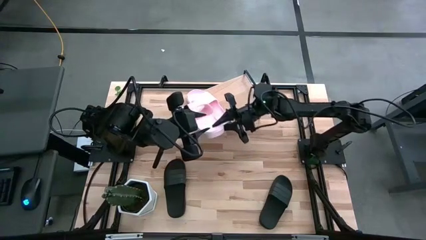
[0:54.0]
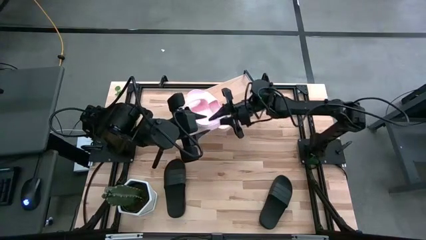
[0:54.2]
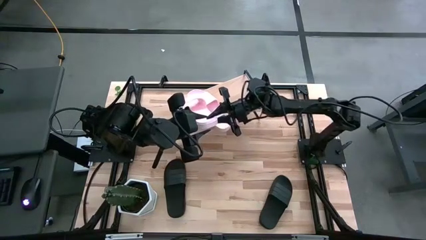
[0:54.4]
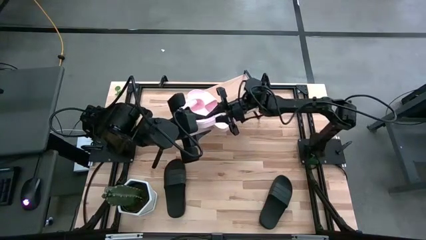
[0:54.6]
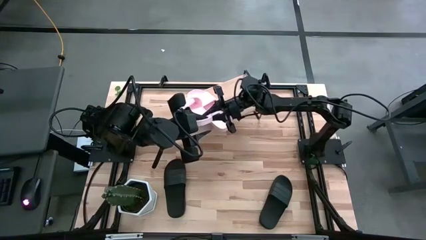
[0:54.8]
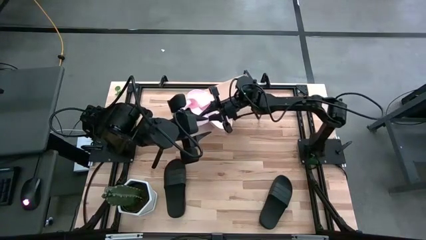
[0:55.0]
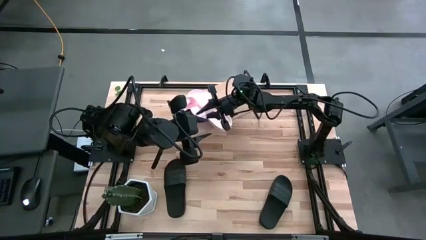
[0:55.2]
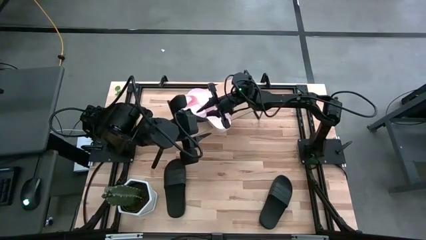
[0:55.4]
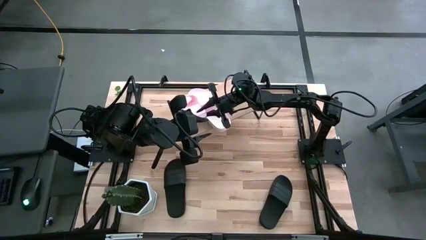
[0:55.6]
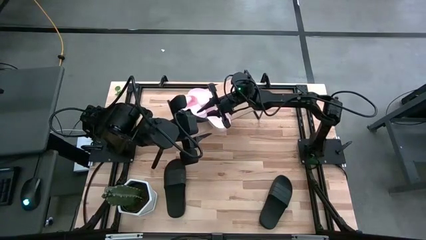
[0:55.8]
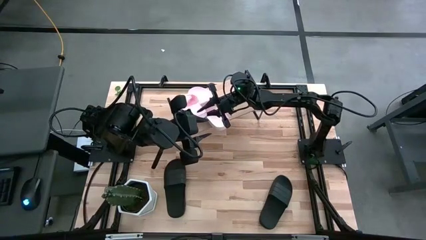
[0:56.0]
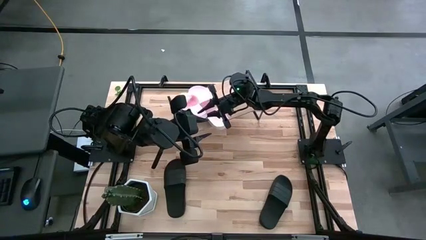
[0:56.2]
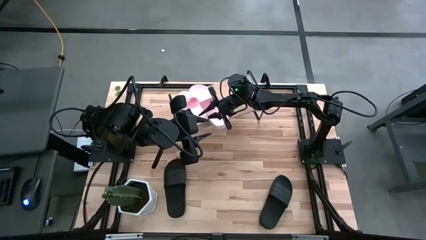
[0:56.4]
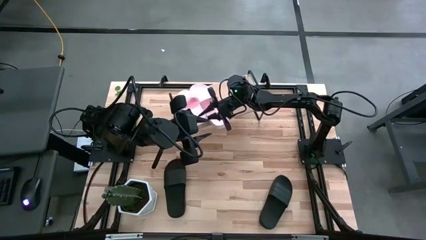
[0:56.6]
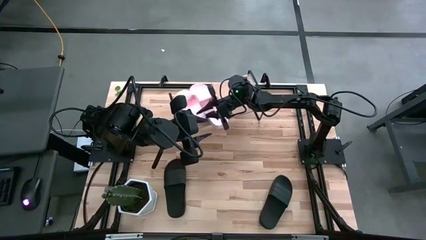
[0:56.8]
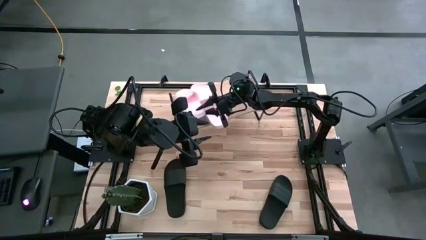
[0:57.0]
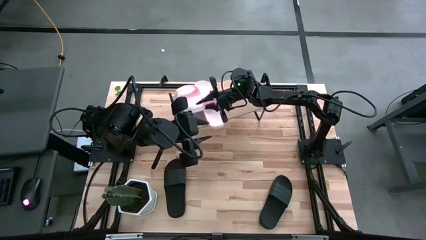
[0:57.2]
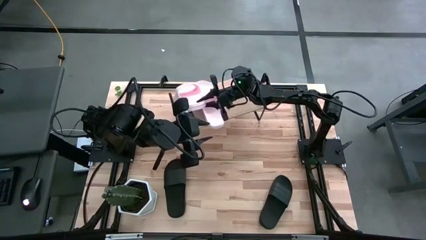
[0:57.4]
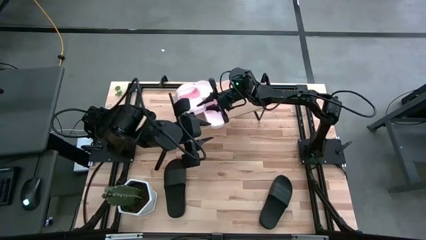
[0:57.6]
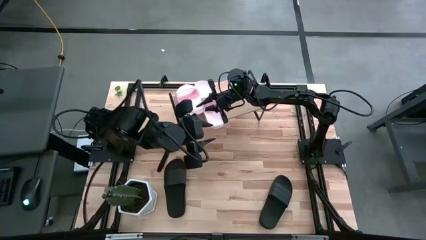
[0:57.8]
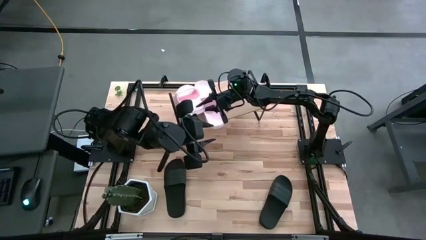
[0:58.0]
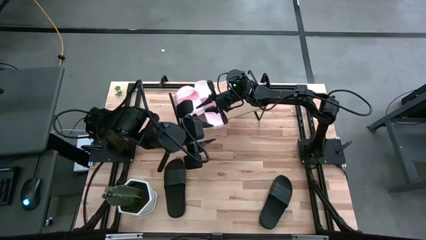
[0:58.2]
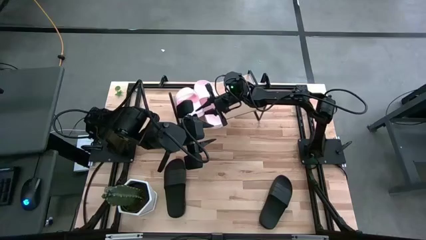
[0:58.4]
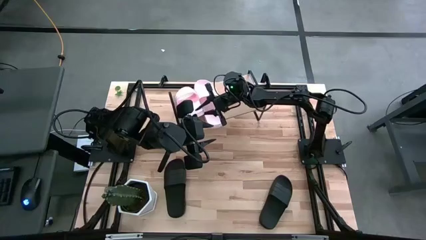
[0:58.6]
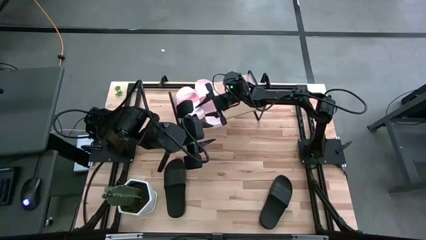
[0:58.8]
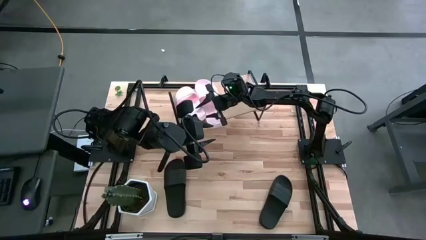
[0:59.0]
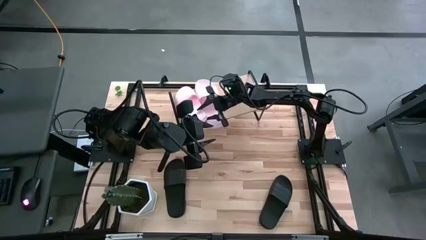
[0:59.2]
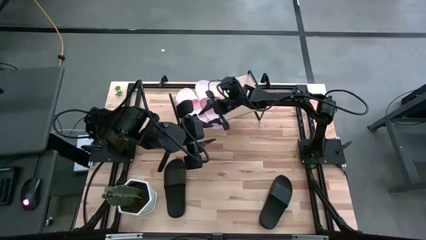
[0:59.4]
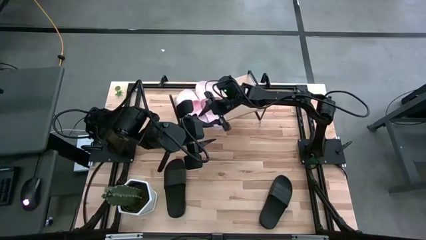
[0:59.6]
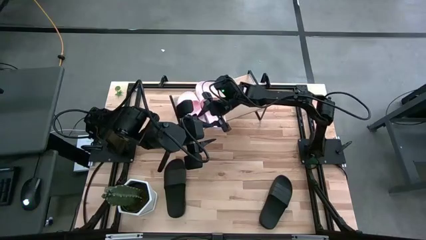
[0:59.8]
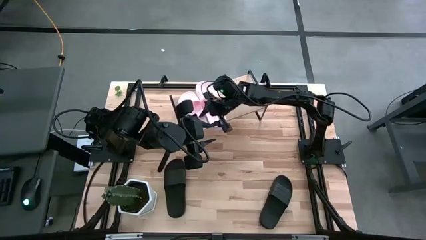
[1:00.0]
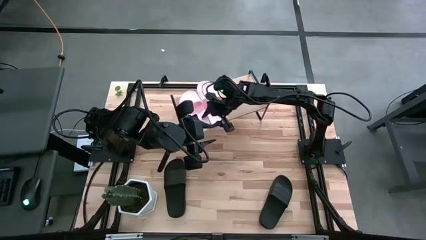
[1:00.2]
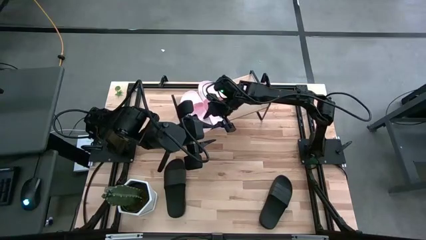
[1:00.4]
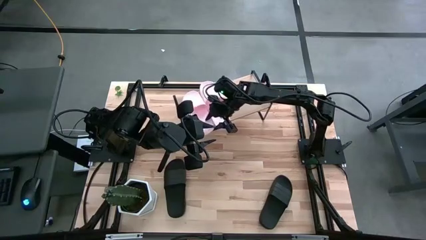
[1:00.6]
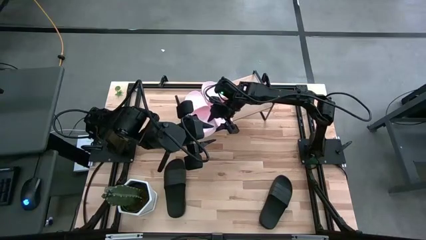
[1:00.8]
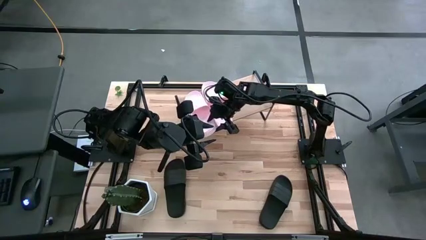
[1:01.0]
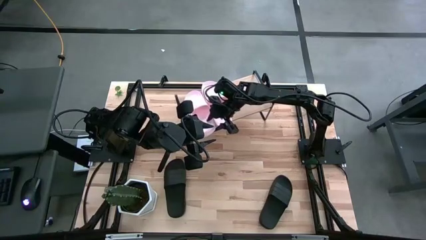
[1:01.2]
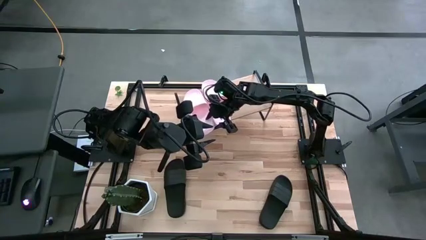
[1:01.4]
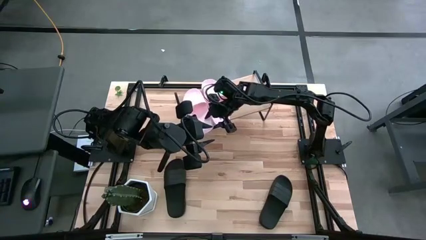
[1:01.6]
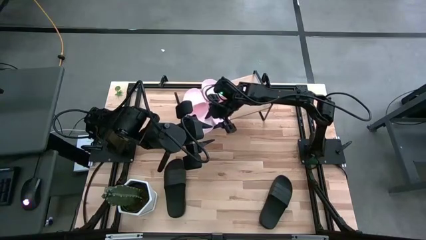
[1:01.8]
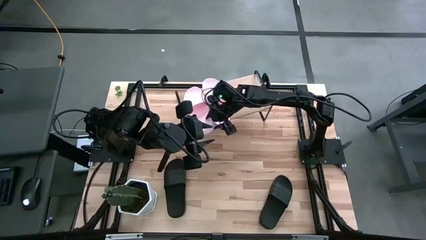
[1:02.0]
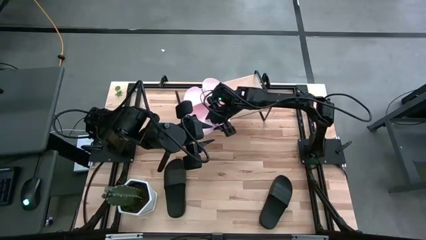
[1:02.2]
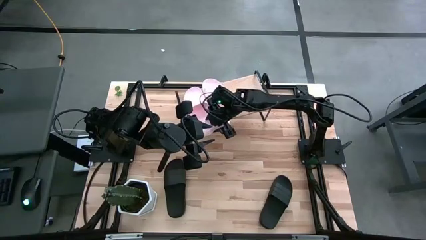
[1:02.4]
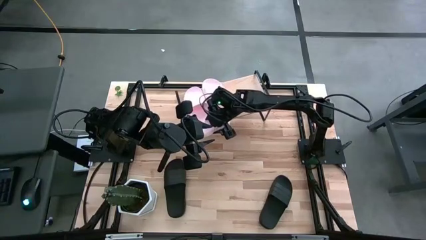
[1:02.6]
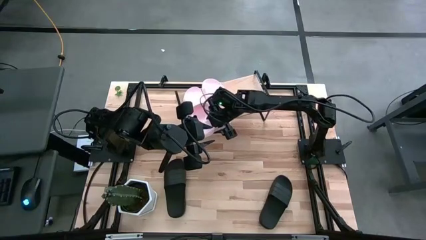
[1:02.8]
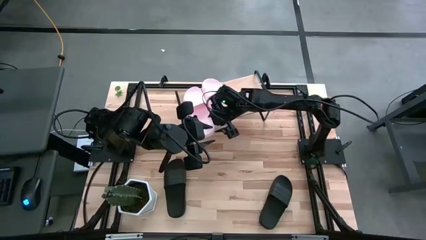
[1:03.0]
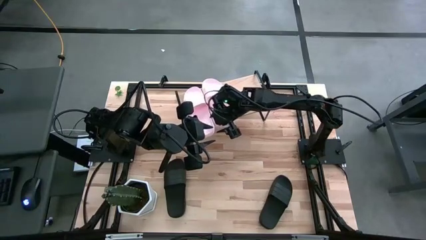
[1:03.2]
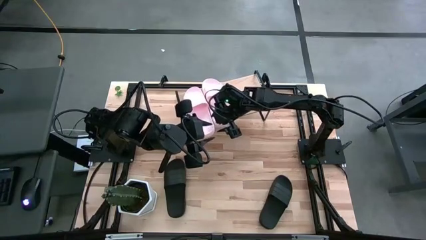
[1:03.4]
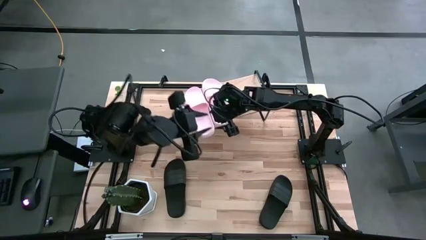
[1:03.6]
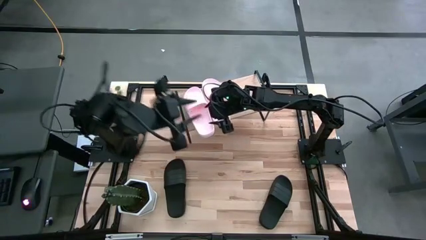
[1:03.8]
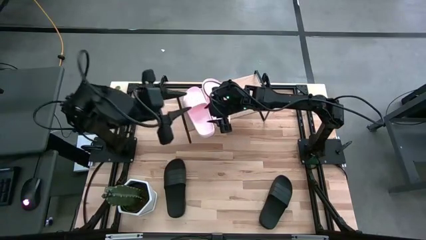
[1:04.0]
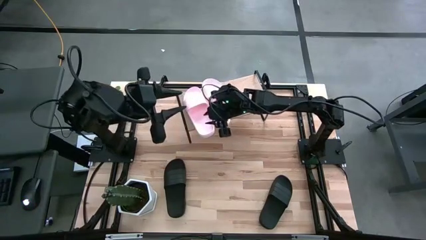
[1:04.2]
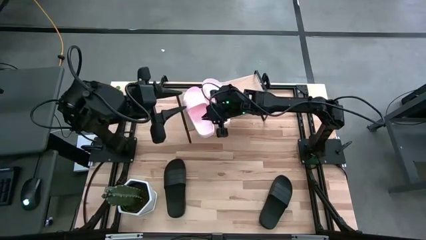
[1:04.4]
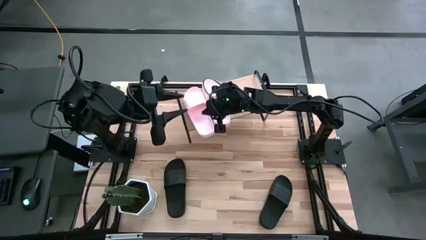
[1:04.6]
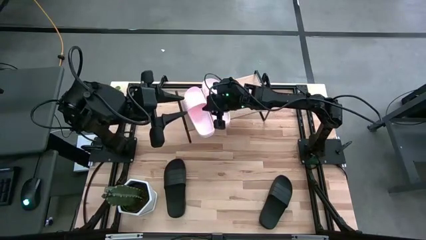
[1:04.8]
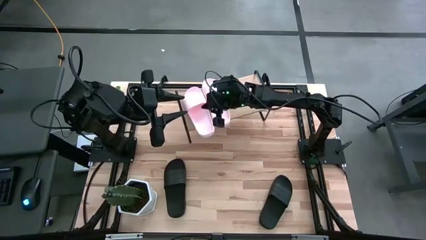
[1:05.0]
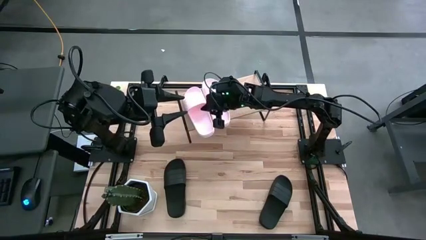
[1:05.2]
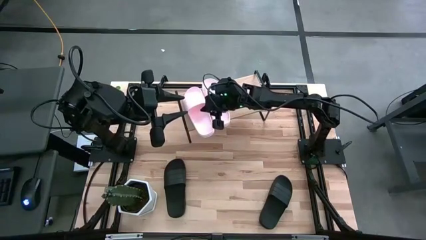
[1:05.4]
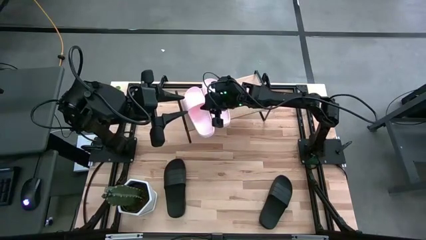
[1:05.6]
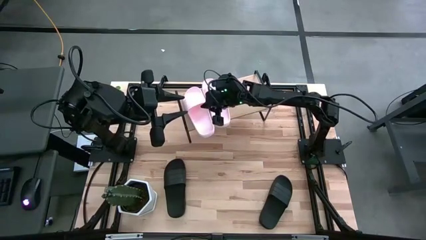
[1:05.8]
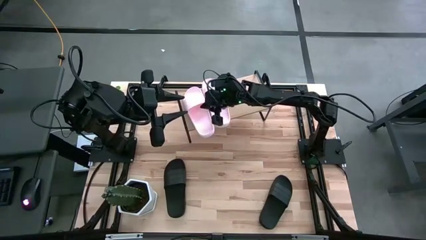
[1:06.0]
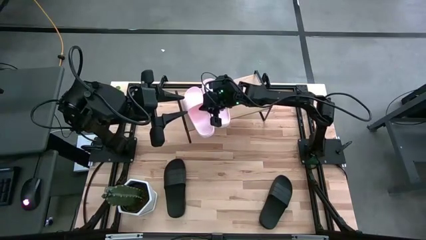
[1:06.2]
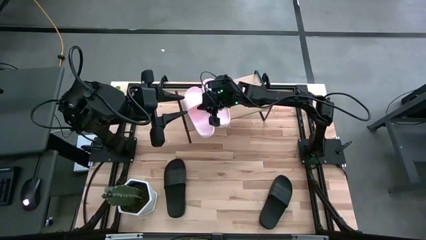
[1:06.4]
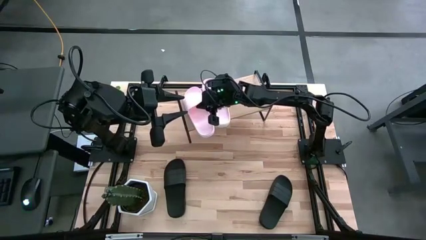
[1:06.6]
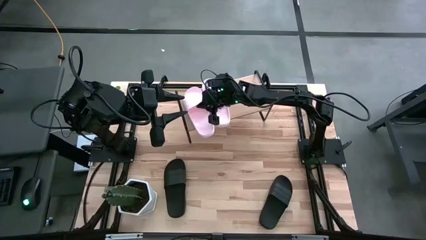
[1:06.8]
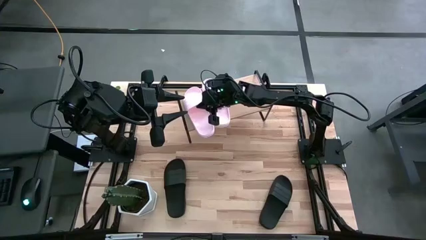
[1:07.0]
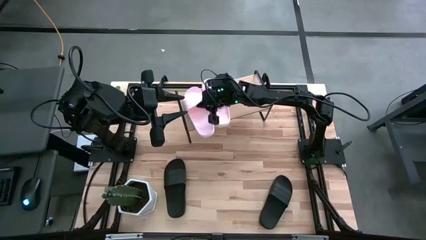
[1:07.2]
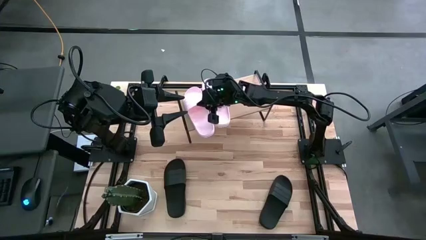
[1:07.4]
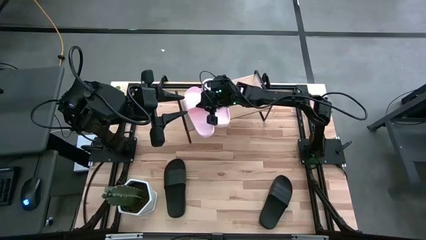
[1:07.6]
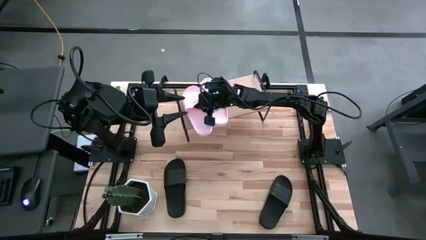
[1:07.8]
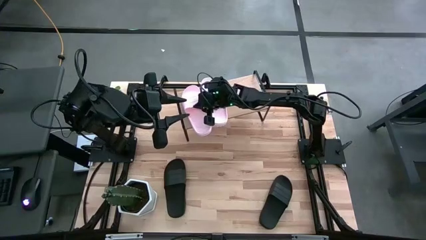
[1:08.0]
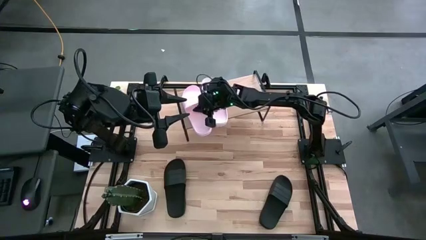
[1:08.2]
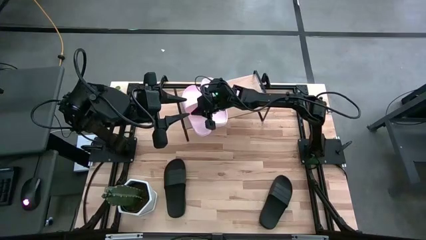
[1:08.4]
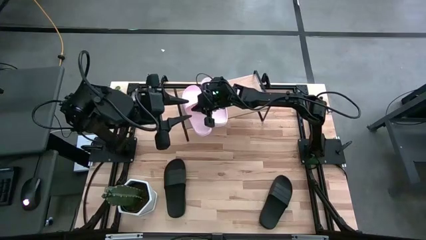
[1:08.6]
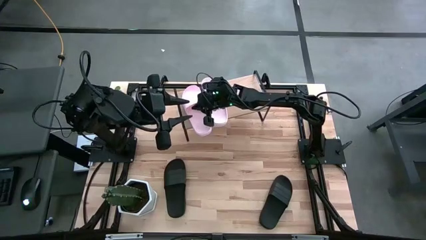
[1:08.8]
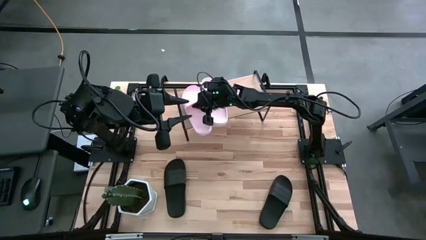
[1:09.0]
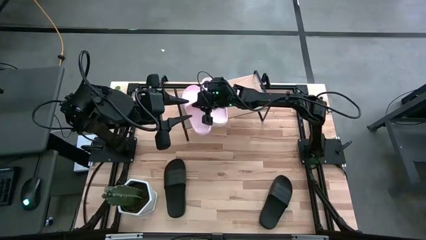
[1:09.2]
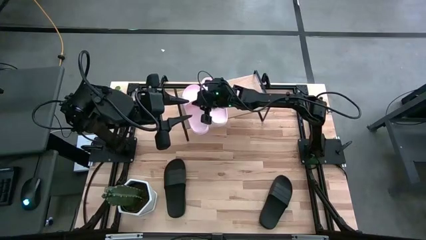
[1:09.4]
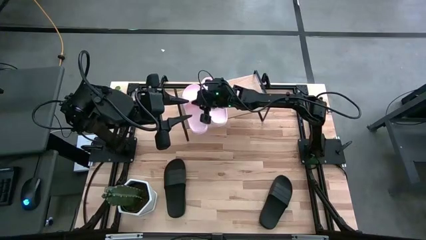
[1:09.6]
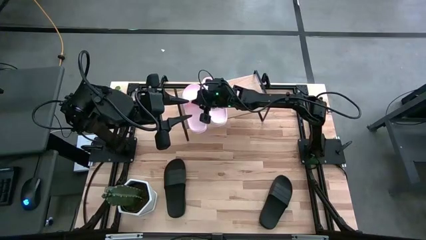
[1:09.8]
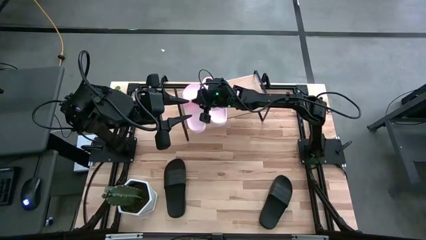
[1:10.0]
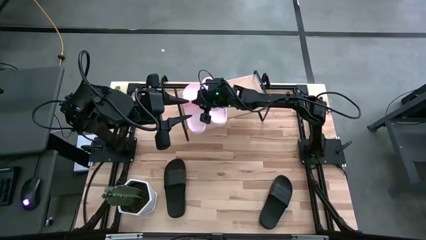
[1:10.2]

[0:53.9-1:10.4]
Task: Pick and place slides into the shelf
Put the pink slipper on the shelf
